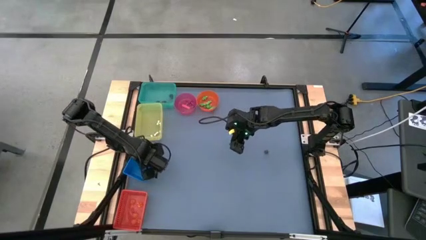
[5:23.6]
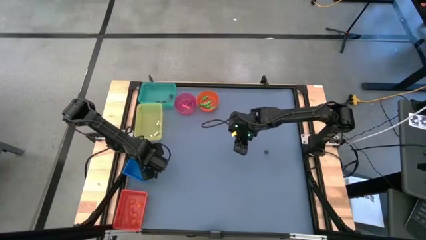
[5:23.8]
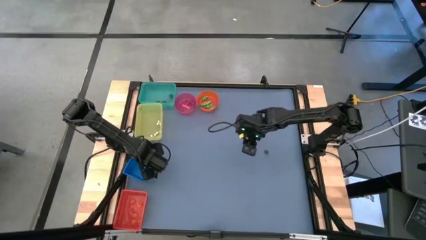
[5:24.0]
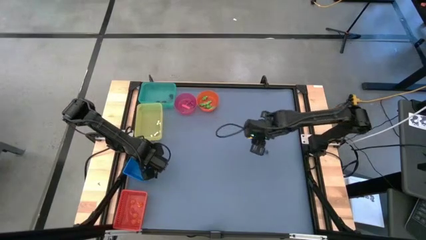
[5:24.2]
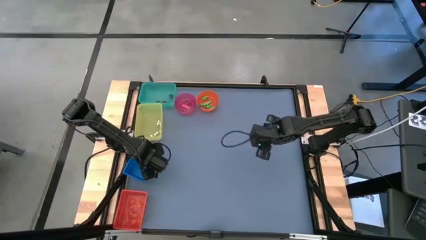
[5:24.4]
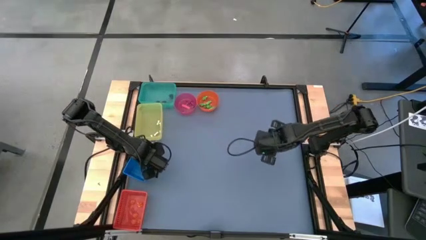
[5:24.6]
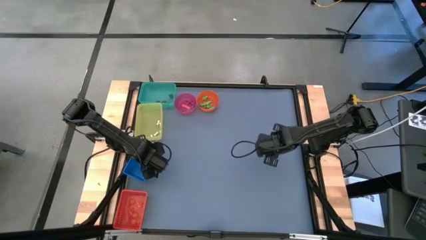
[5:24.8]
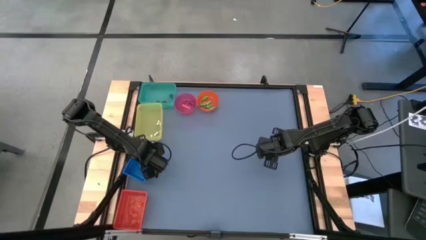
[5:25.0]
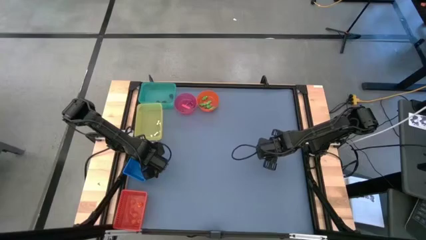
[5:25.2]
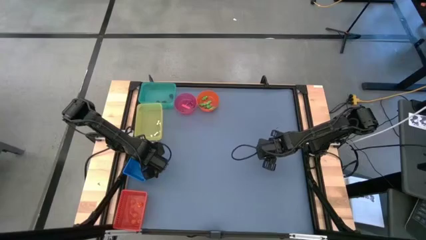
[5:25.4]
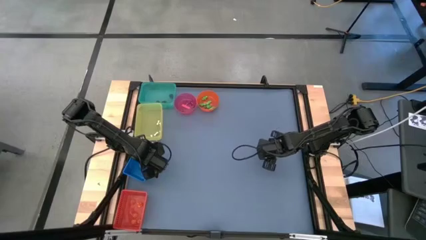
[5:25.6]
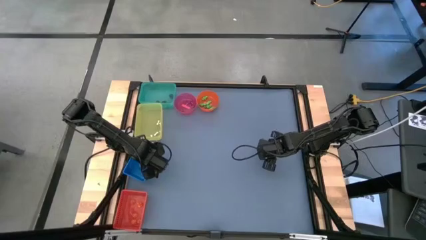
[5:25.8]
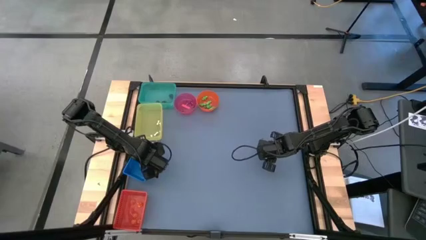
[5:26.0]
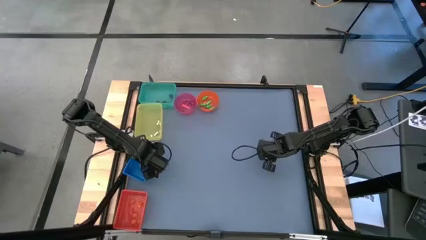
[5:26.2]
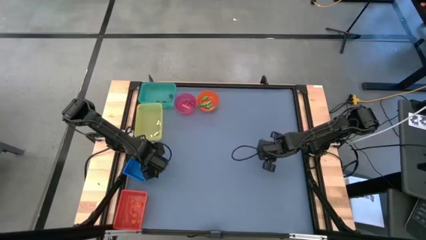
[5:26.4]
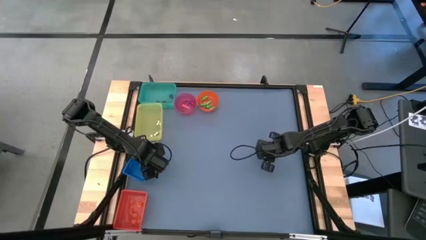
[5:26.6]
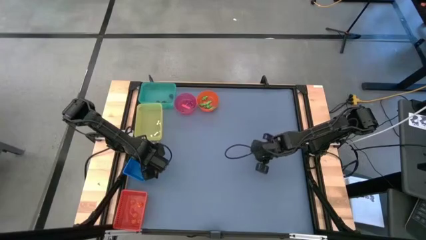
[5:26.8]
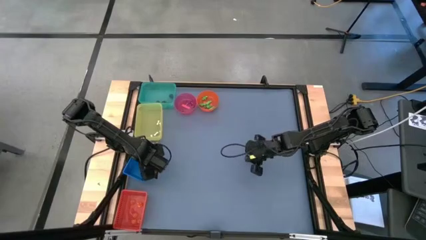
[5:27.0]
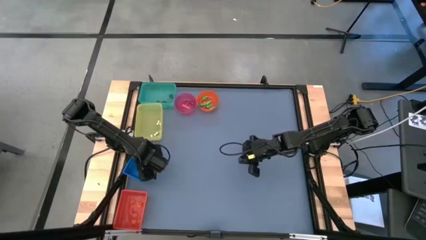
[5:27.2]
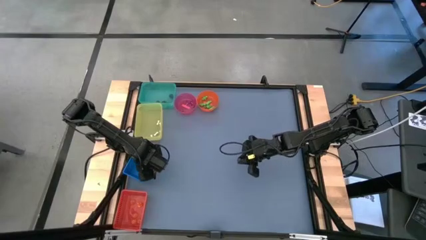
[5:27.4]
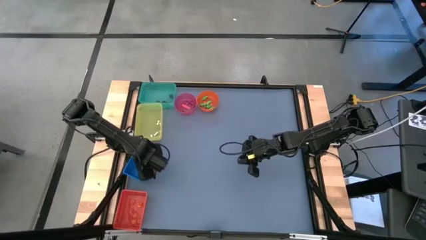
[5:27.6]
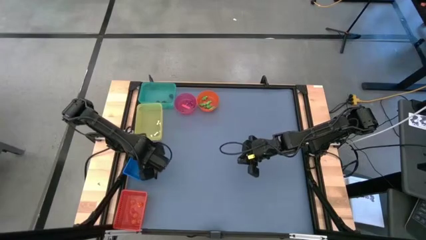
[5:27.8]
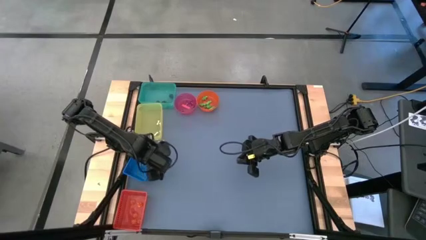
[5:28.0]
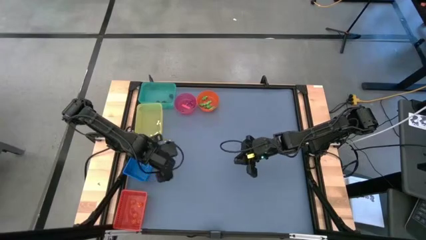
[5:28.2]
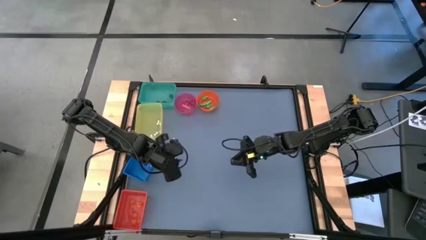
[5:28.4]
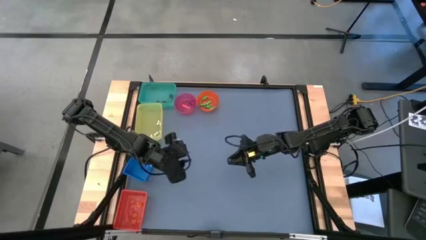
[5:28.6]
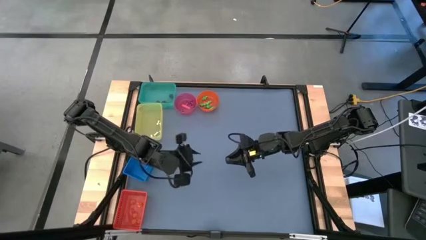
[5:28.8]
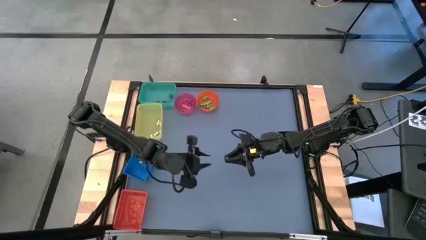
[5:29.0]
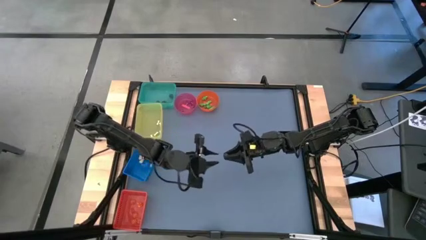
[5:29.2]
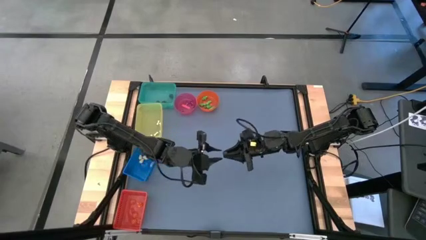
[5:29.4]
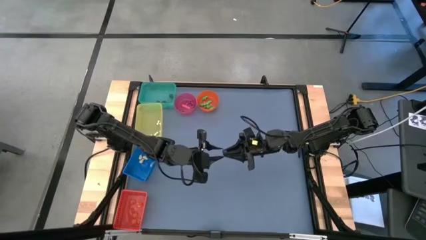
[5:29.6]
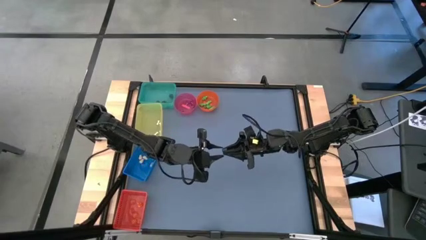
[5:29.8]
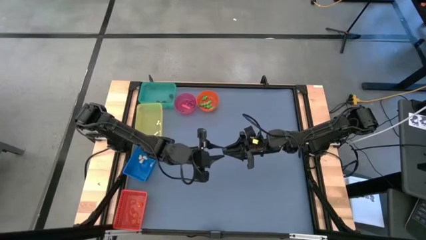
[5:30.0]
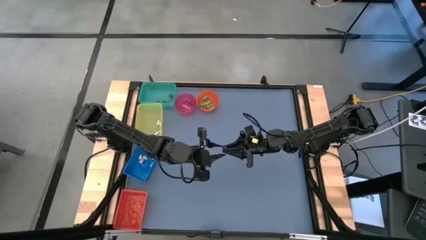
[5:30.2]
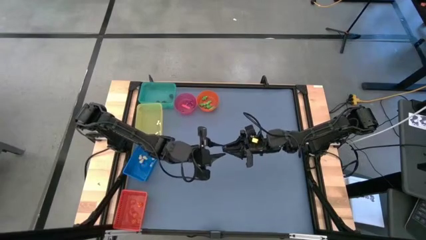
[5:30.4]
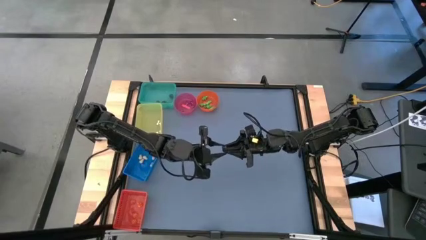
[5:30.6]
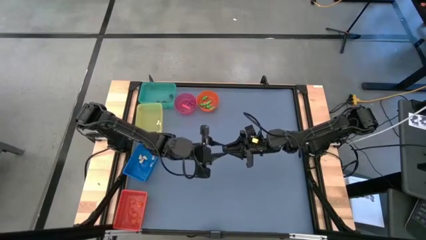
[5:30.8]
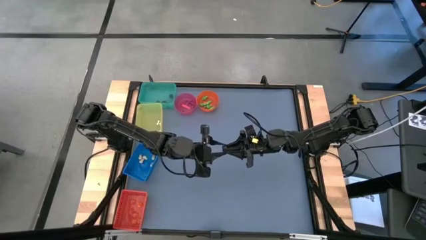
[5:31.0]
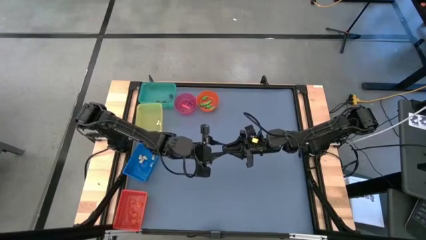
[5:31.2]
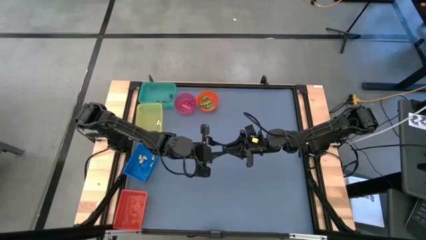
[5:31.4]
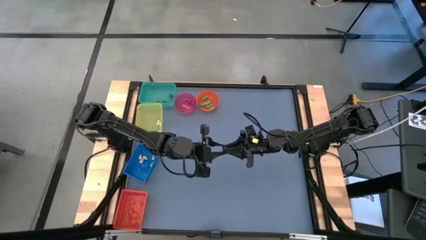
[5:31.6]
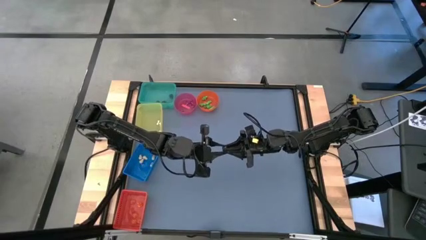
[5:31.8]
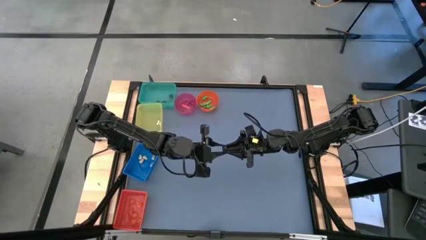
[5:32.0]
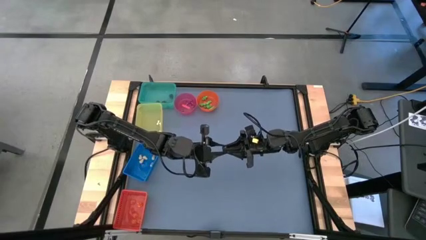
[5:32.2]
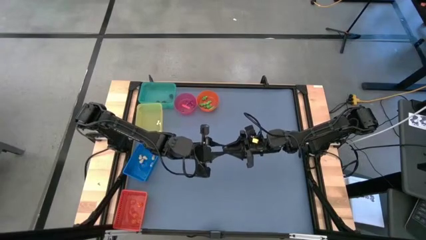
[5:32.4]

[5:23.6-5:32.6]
Task: Sort Halloween decoration
Put the black skull toy into the green bin

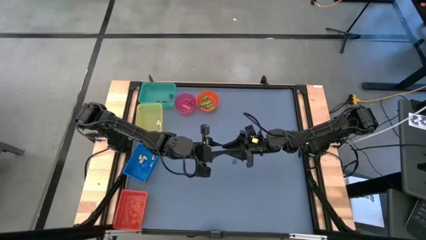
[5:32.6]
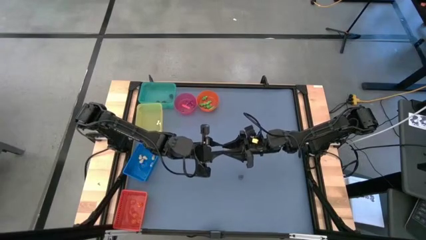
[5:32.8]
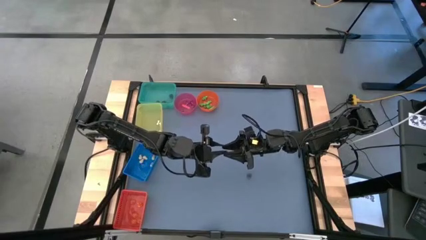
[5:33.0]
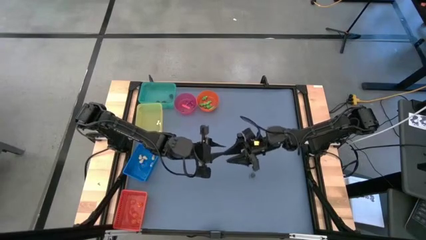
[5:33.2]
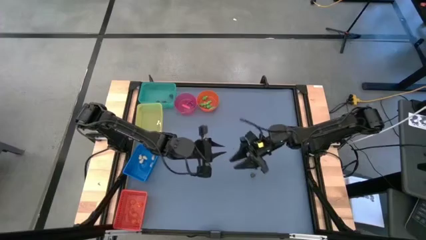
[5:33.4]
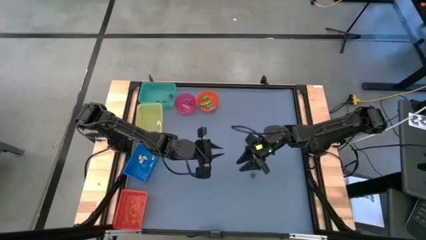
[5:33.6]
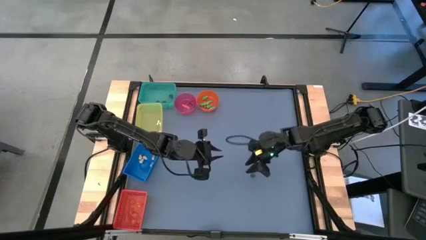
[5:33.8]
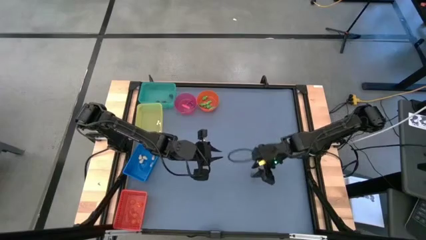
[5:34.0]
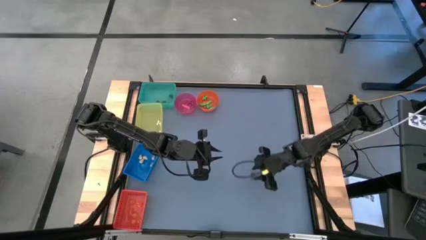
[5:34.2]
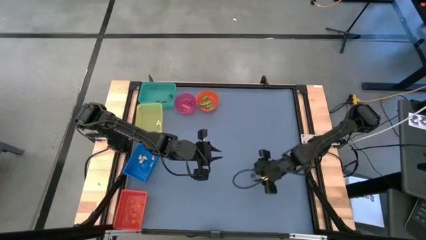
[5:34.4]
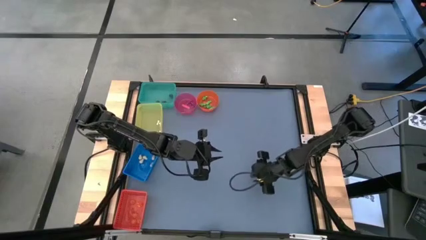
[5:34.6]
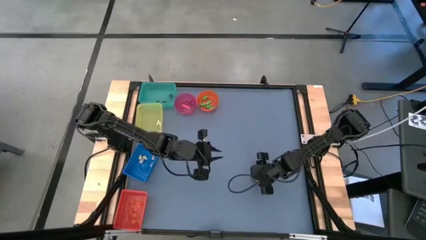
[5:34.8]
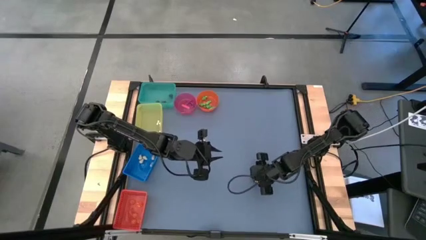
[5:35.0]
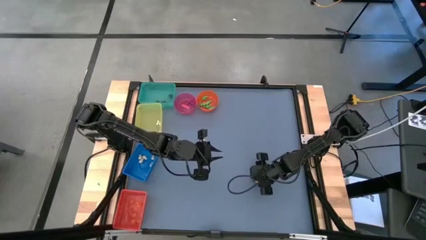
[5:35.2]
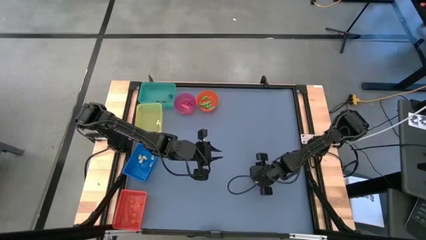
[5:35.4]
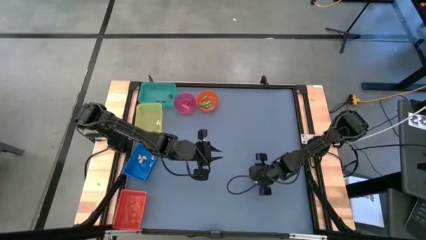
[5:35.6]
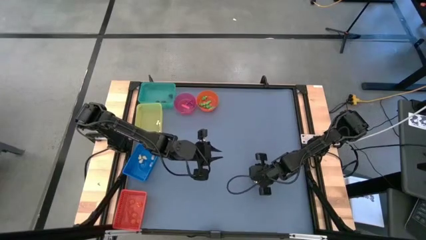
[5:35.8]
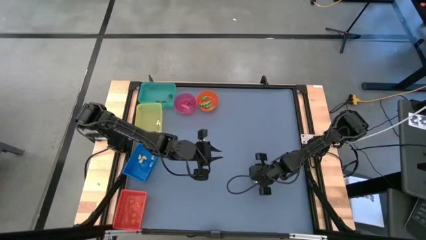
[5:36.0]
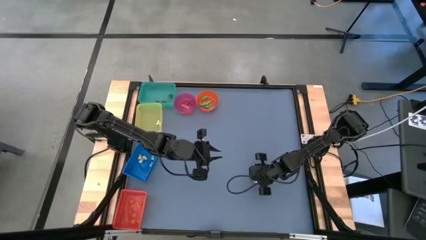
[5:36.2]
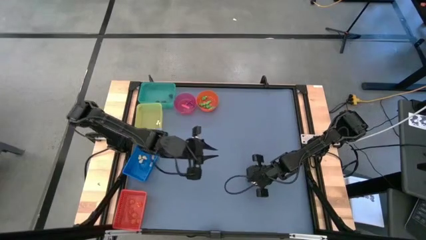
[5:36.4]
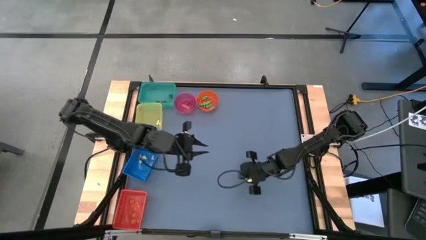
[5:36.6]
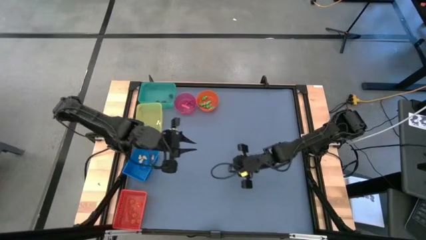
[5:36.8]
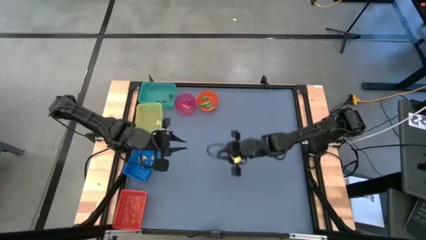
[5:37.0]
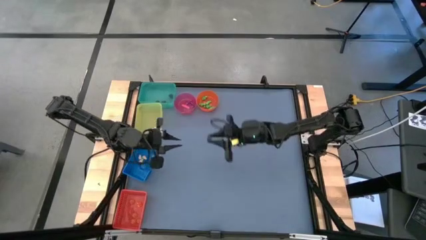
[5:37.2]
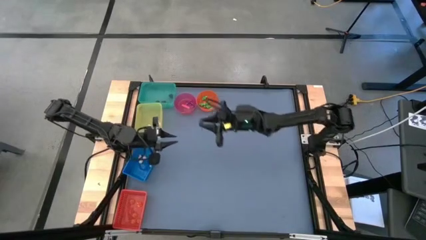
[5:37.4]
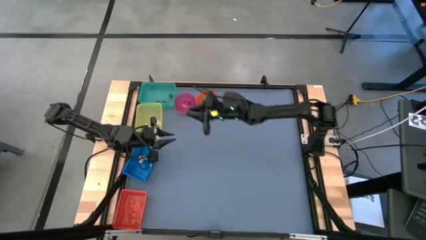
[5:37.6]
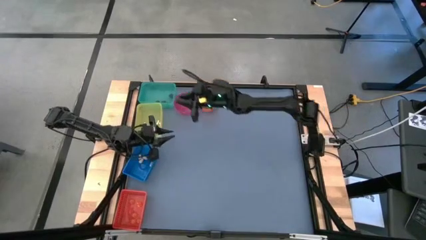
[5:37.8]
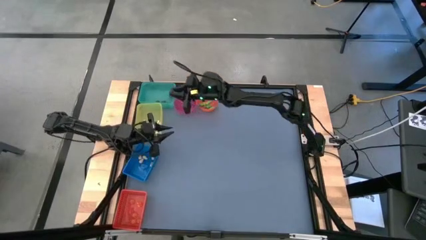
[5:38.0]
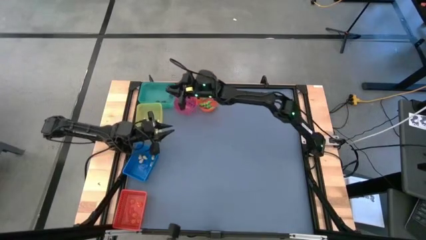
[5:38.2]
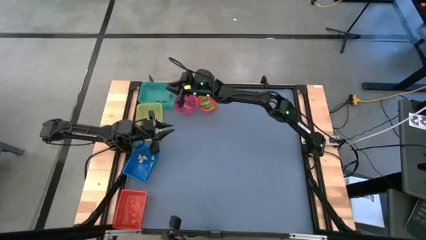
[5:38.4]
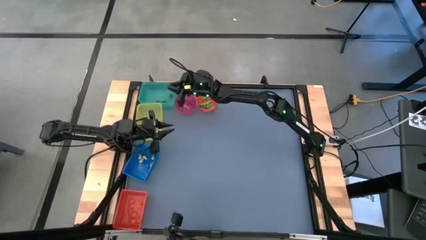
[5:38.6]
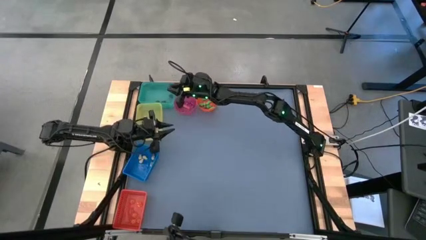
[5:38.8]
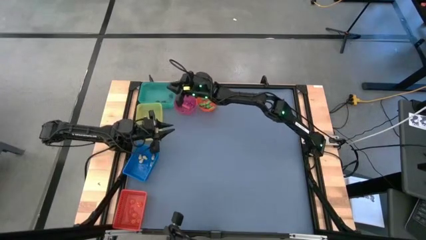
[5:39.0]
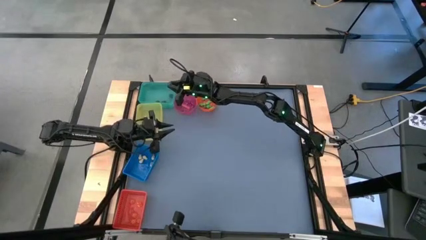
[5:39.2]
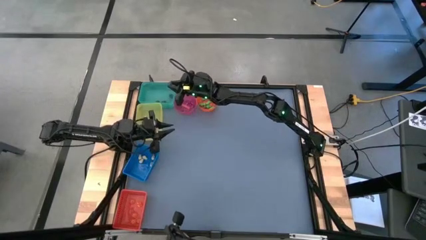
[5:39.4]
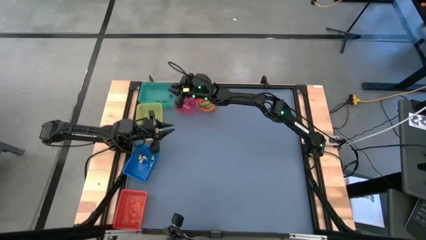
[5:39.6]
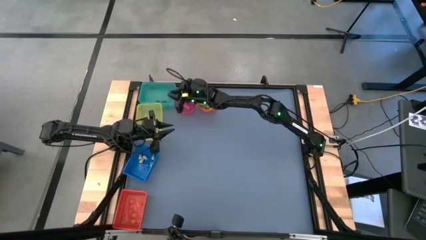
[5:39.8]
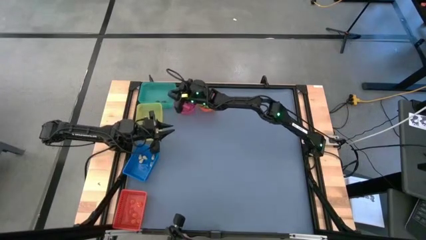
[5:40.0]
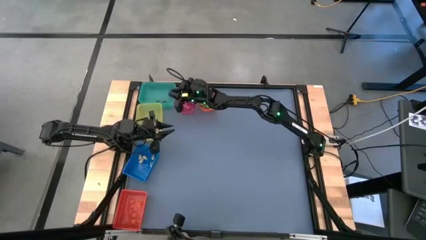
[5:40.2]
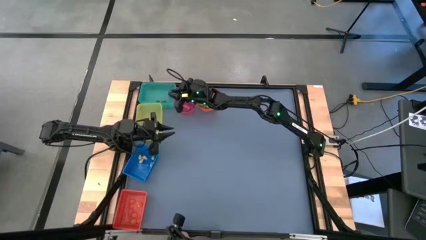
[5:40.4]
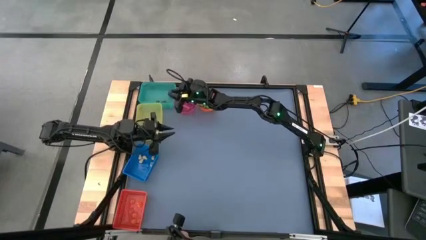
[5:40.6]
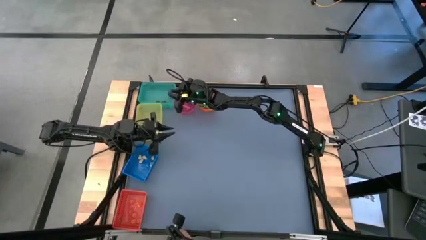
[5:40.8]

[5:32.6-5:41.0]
Put the black skull toy into the green bin
